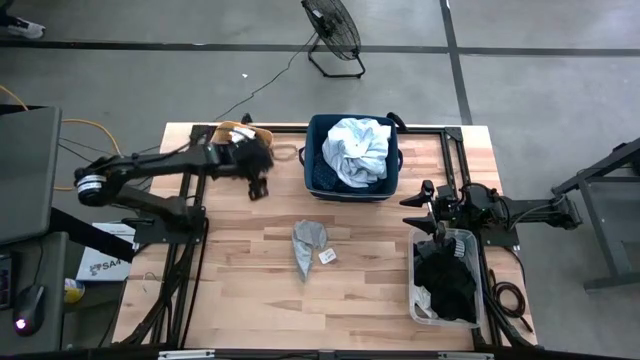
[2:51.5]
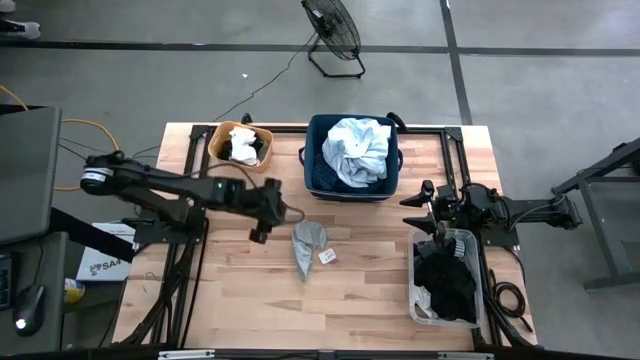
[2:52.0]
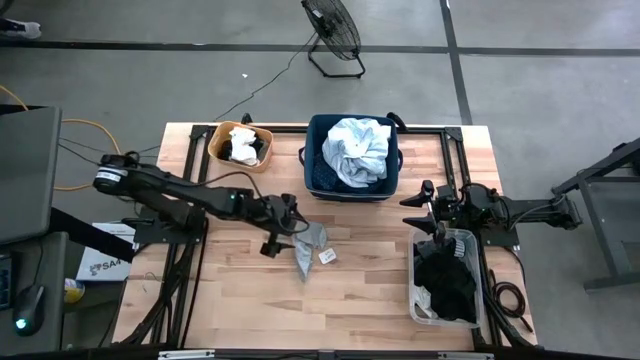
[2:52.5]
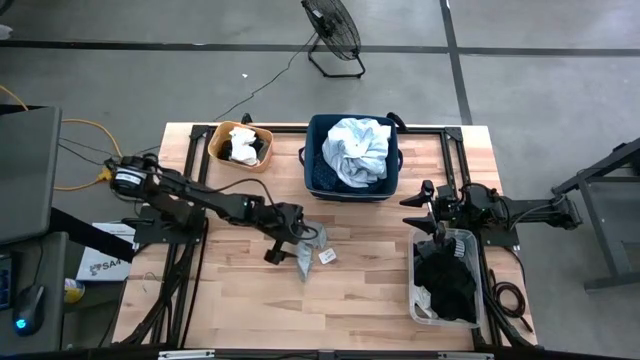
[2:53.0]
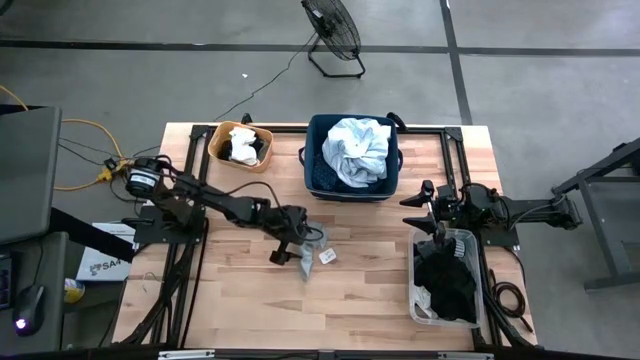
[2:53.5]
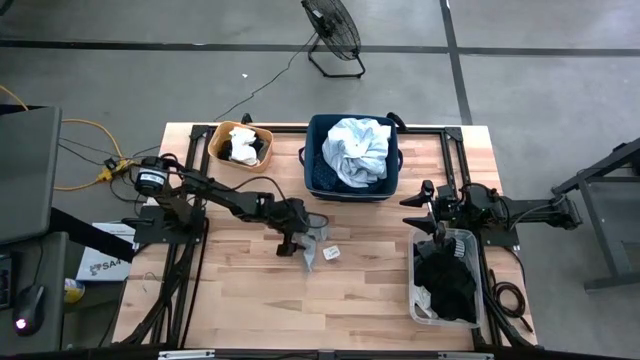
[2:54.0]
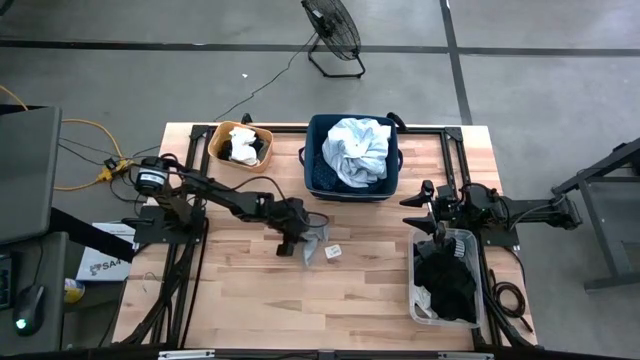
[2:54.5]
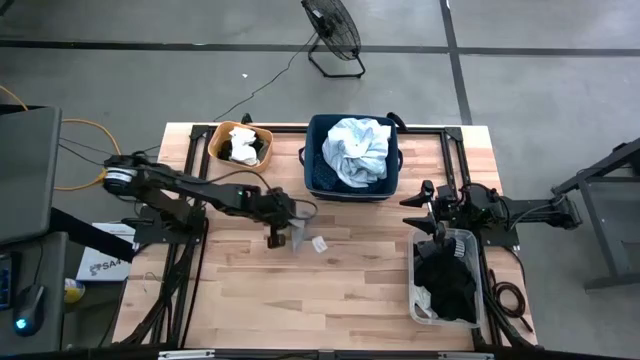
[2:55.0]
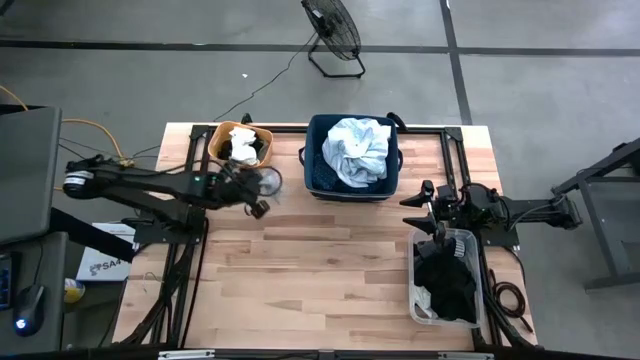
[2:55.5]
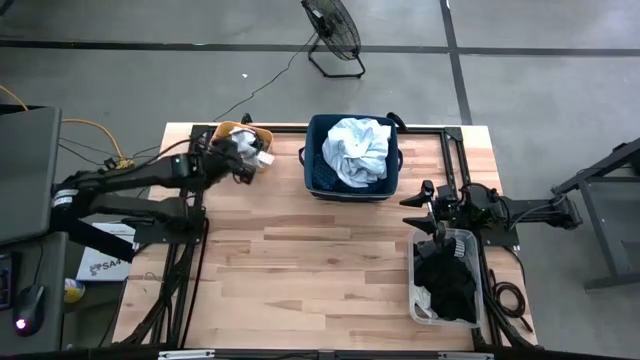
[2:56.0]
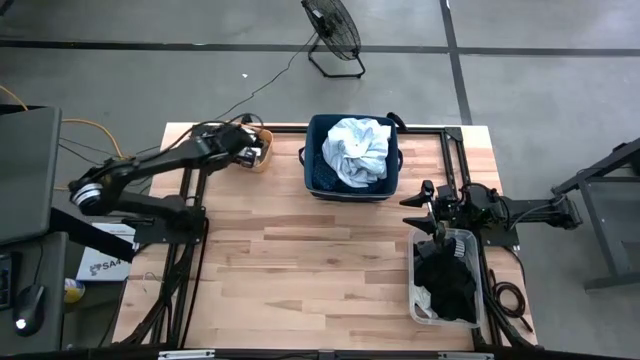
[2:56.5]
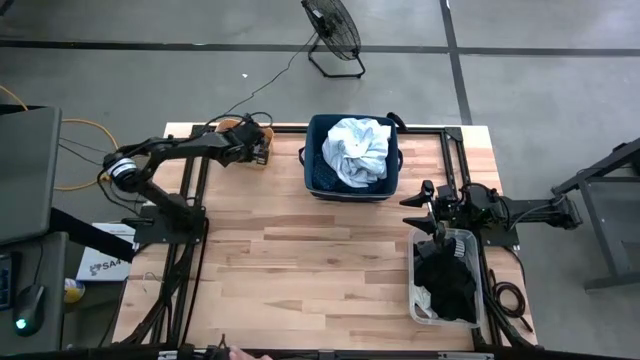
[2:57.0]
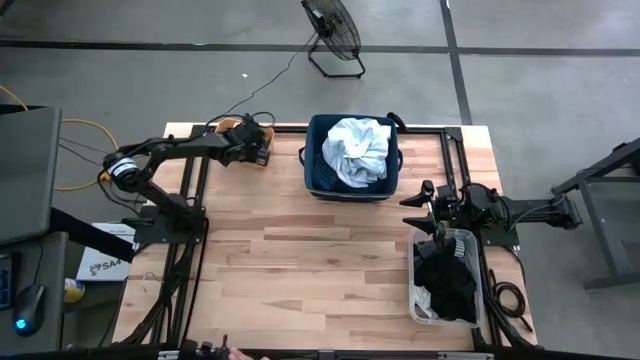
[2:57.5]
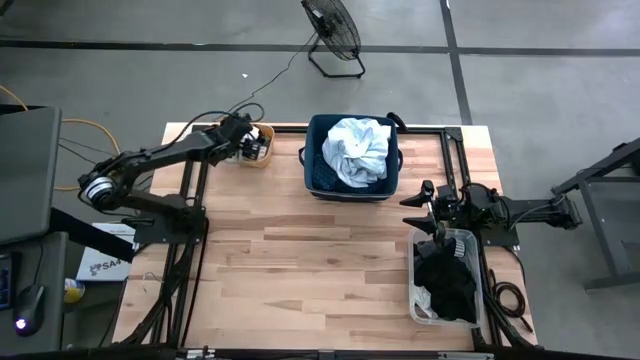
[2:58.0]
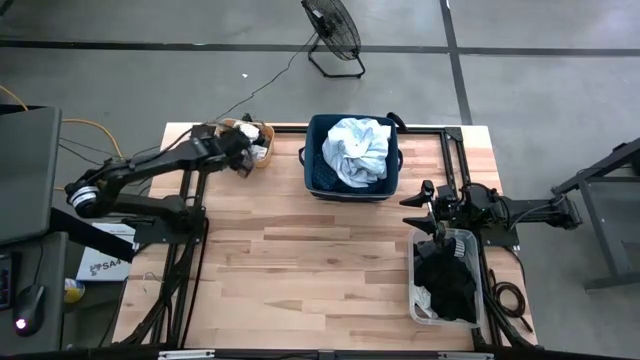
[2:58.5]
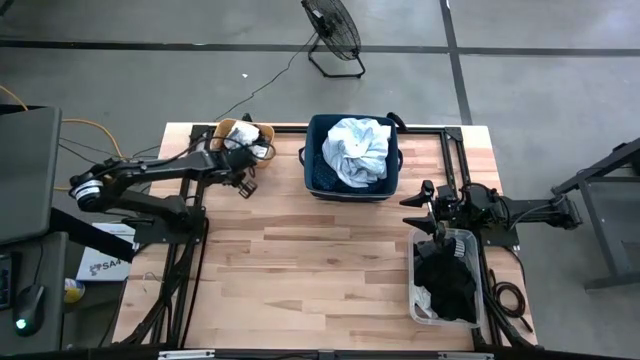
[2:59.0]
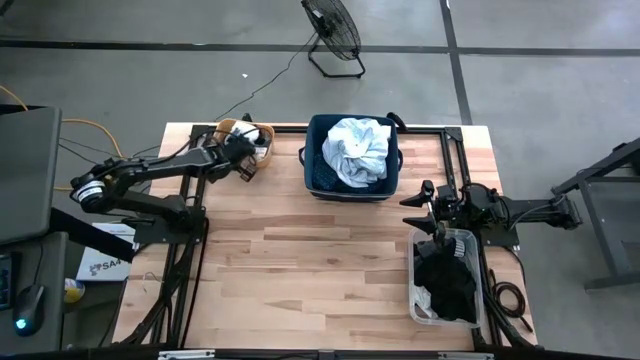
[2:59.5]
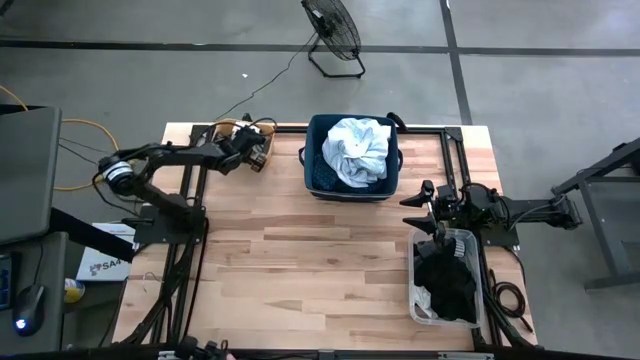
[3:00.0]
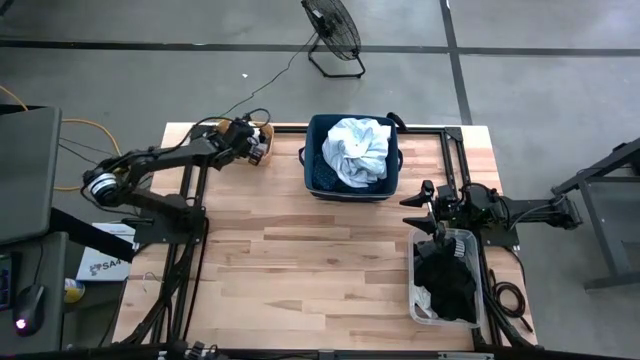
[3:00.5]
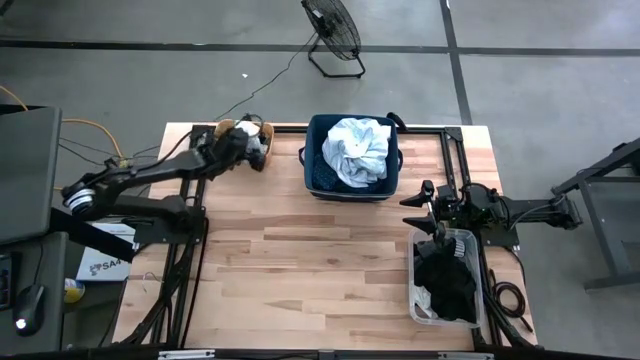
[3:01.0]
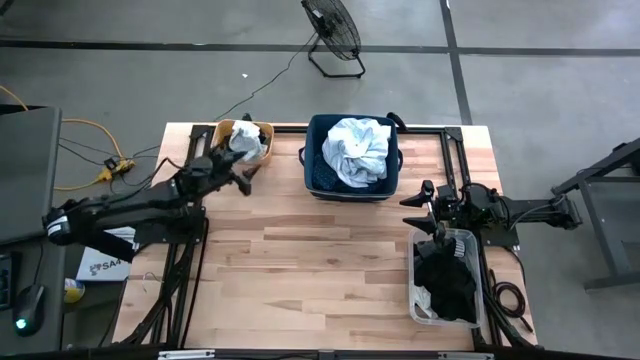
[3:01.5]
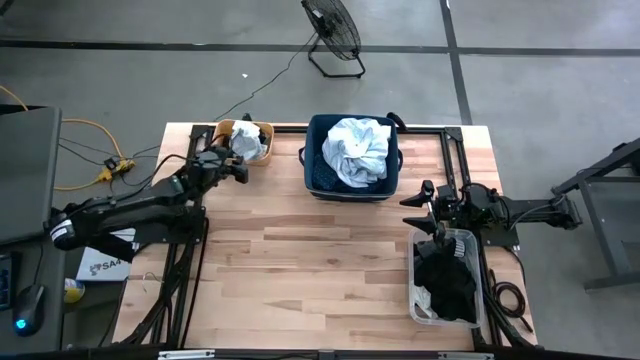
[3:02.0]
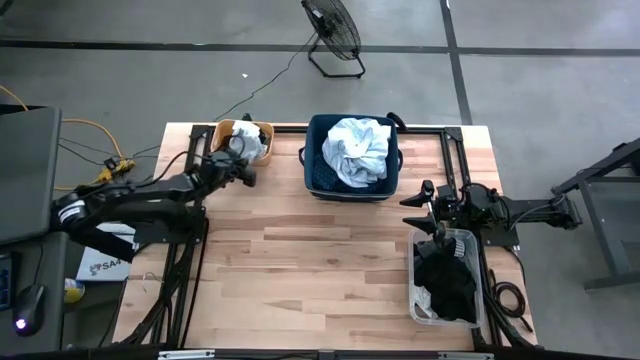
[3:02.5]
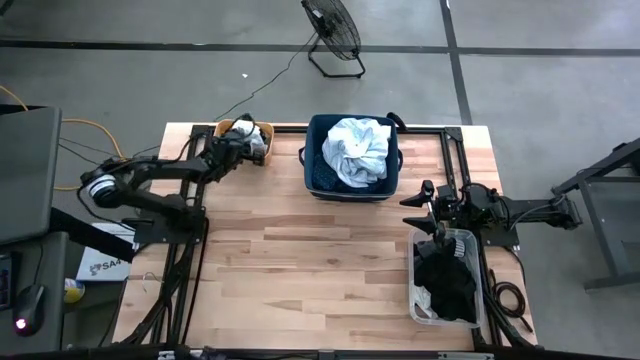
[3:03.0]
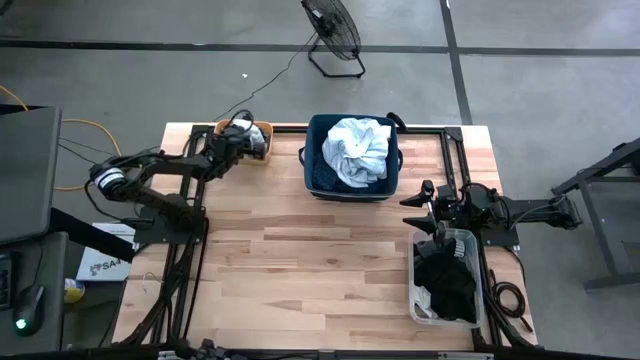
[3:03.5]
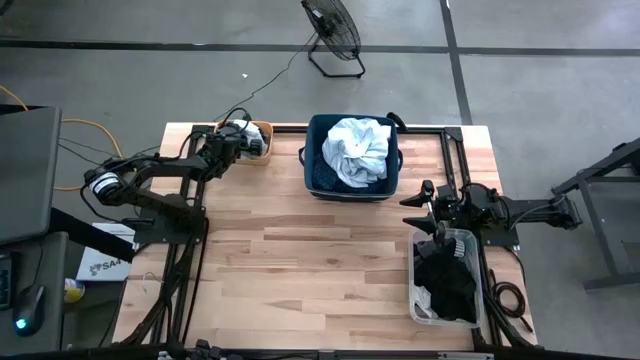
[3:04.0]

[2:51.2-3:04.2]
Task: Pick & Place Cloths
Put the gray sock into the yellow bin

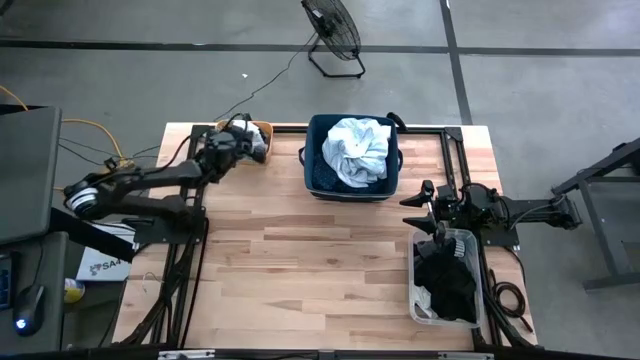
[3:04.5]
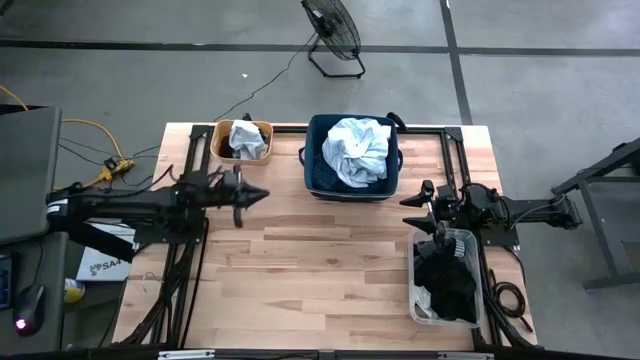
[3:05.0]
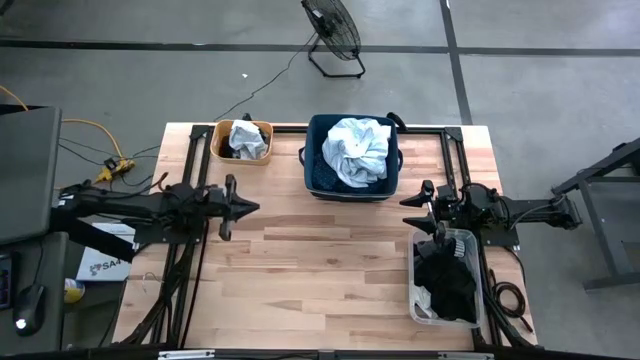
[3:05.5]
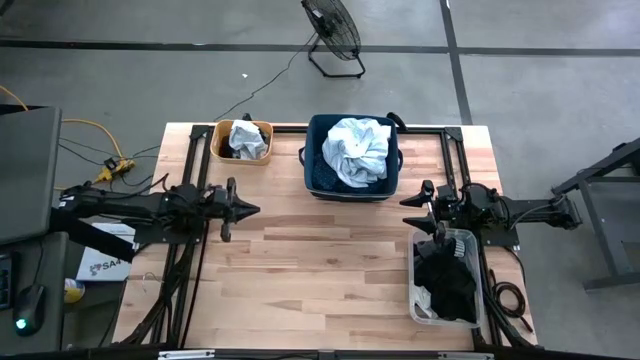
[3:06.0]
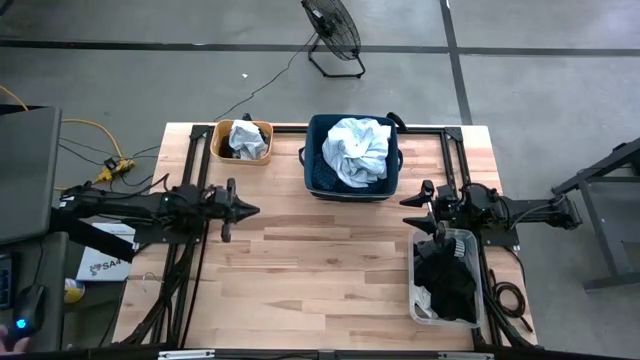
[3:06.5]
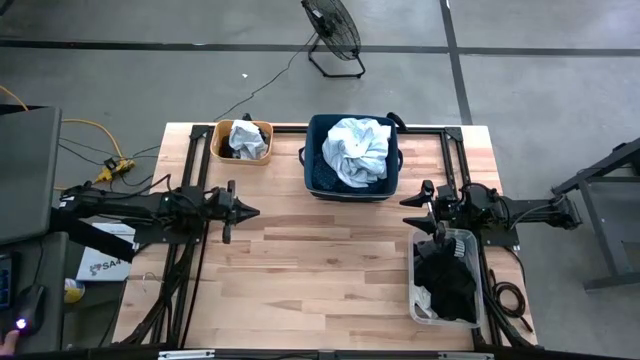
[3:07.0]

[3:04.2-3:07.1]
Return to Home Position

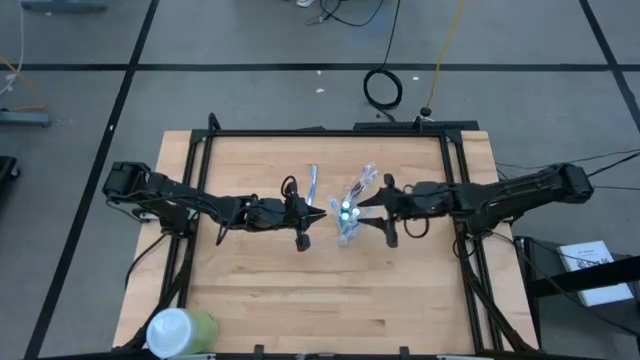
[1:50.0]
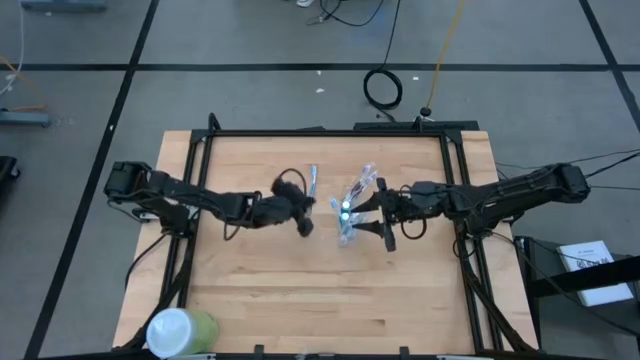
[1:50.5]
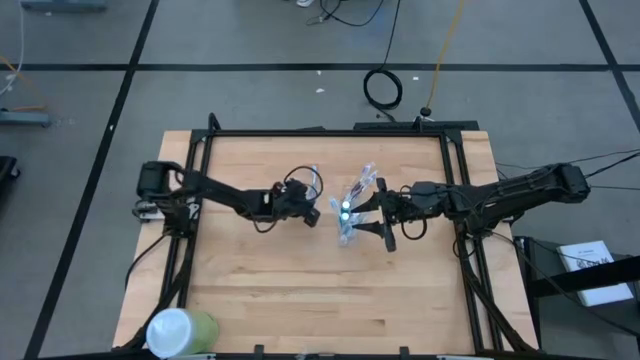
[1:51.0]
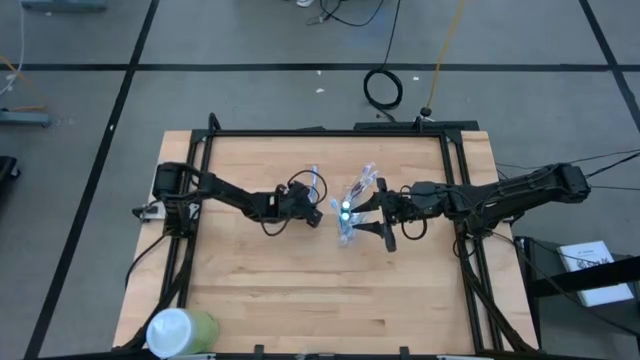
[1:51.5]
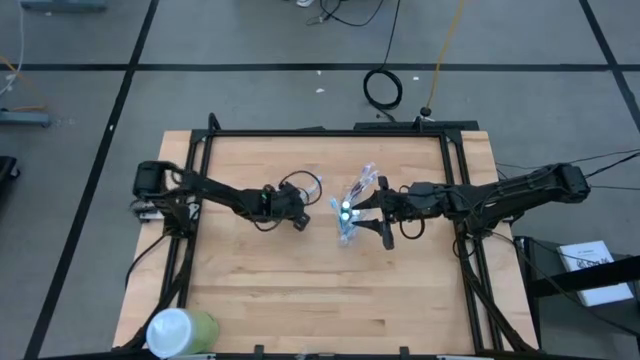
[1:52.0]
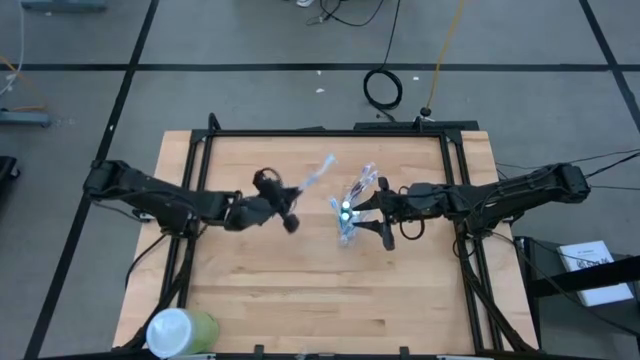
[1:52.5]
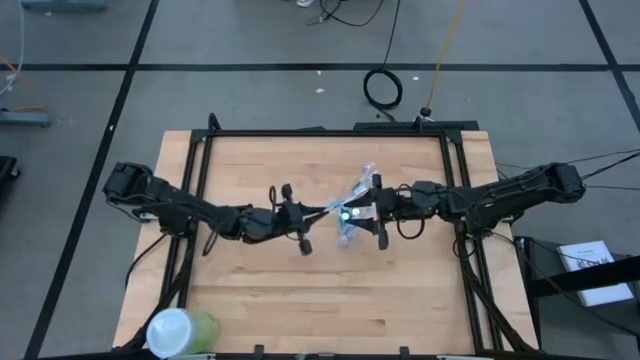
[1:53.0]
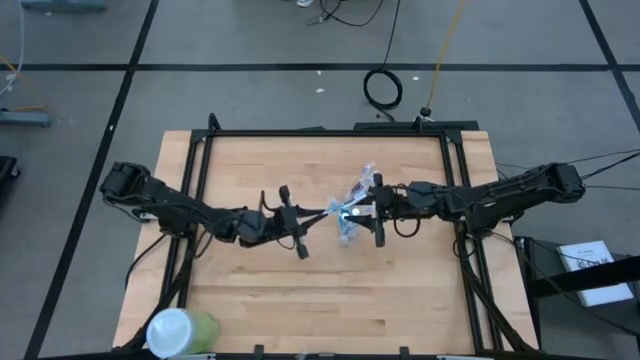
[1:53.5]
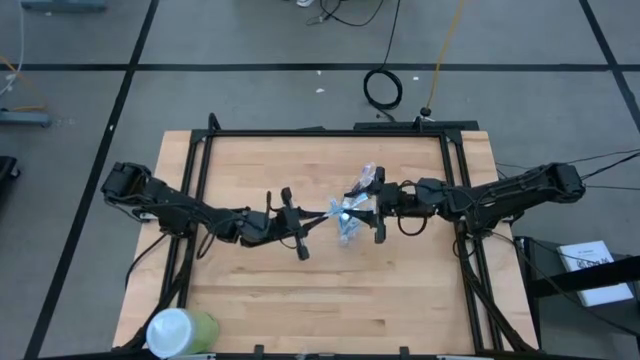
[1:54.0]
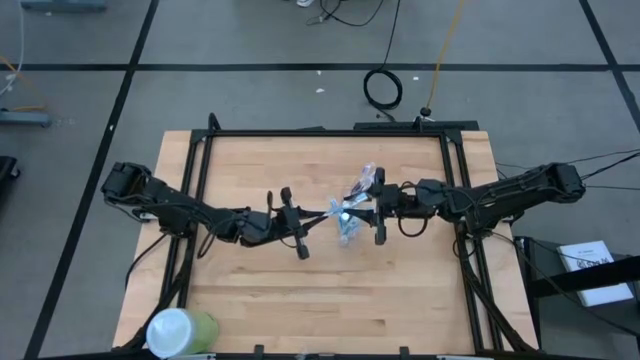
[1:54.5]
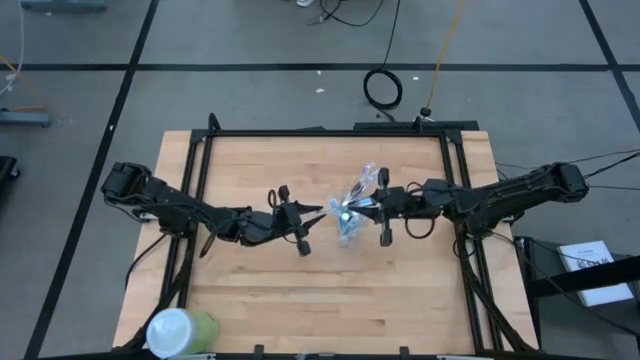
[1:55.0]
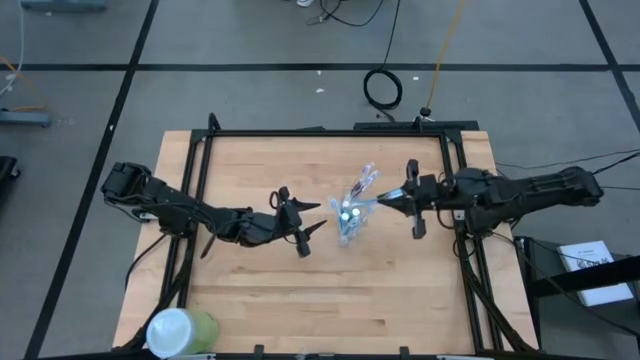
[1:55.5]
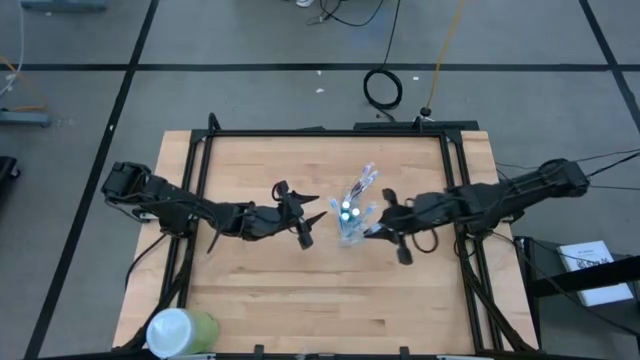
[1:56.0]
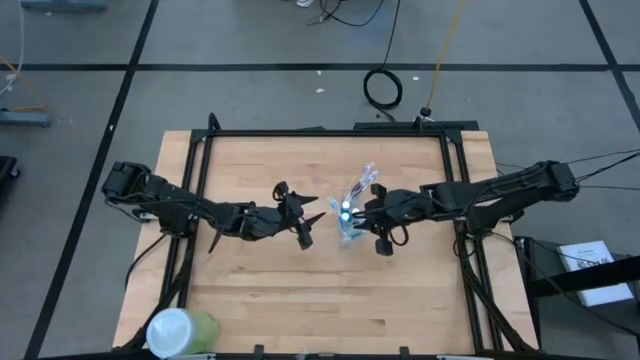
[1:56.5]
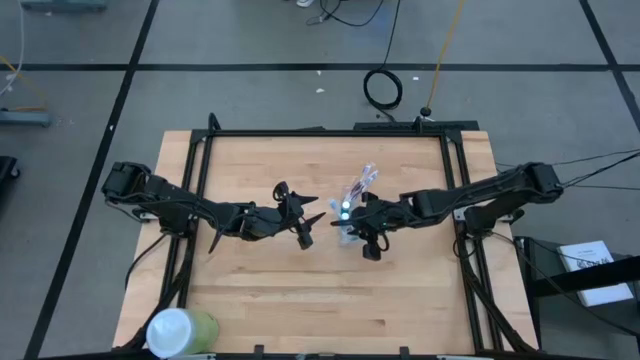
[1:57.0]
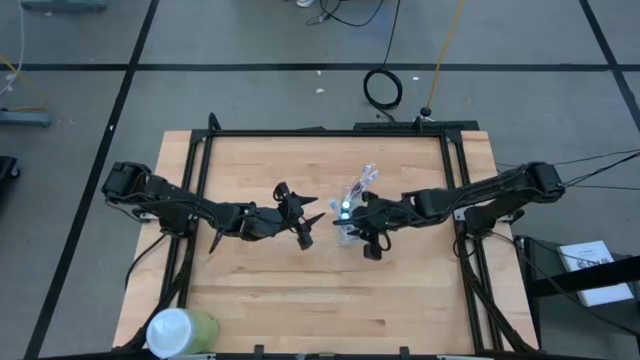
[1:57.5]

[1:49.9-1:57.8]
Task: Pick & Place toothbrushing station
Put the blue toothbrush into the transparent organizer
